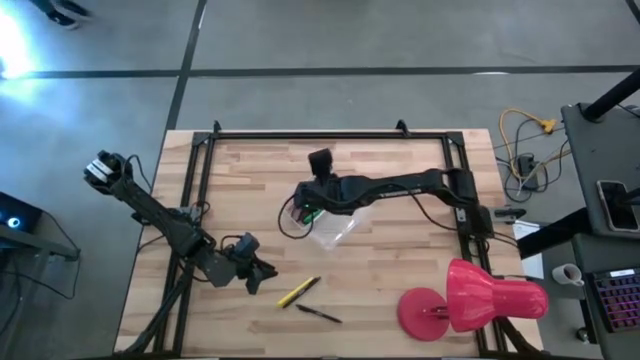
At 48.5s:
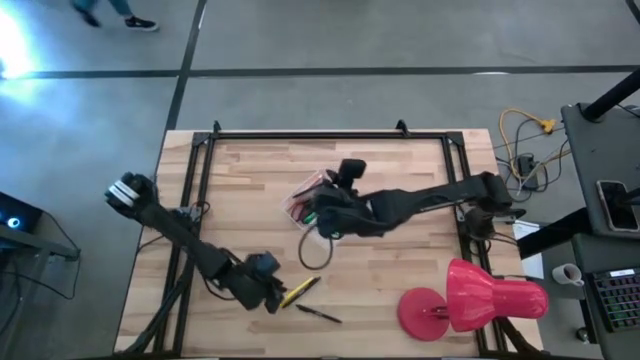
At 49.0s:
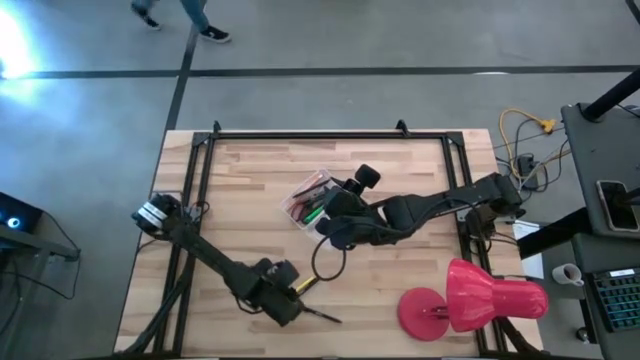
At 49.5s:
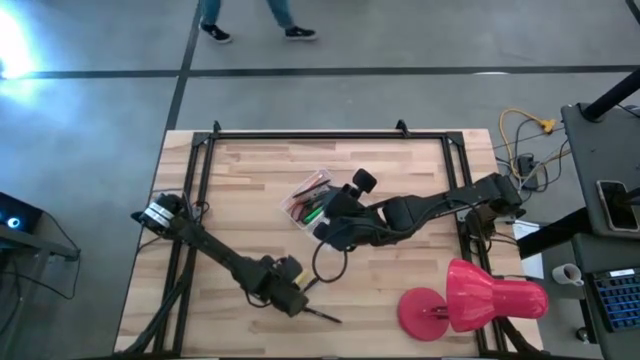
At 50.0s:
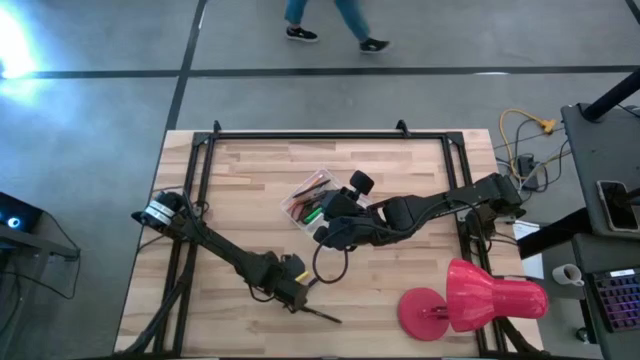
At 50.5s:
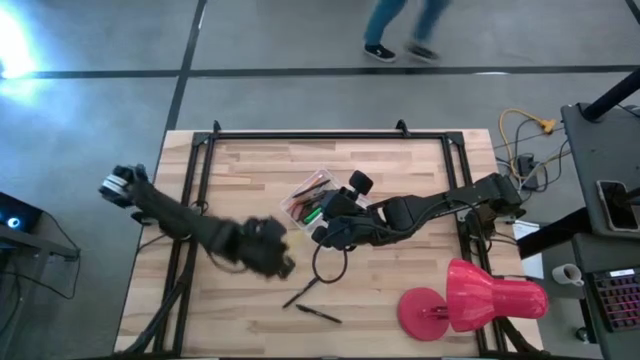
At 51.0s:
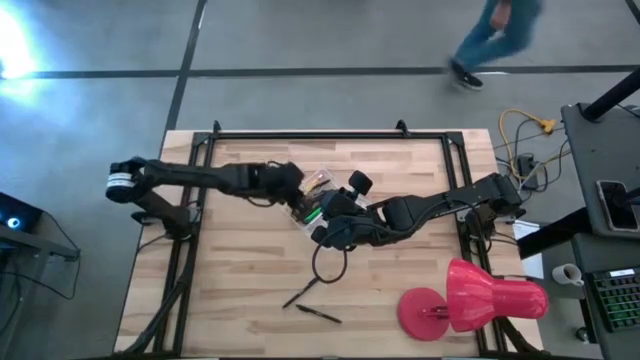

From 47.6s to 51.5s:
Task: Pick & place school supplies into a supply box
Put the yellow pen into the transparent supply box

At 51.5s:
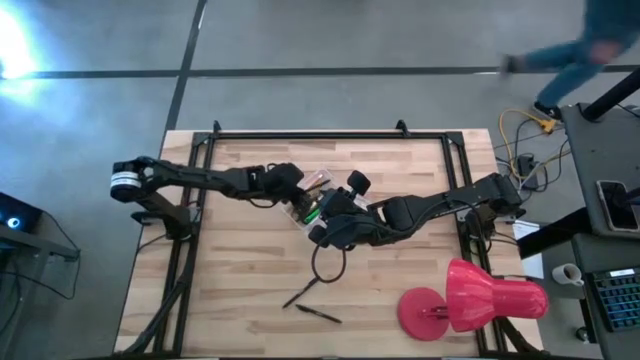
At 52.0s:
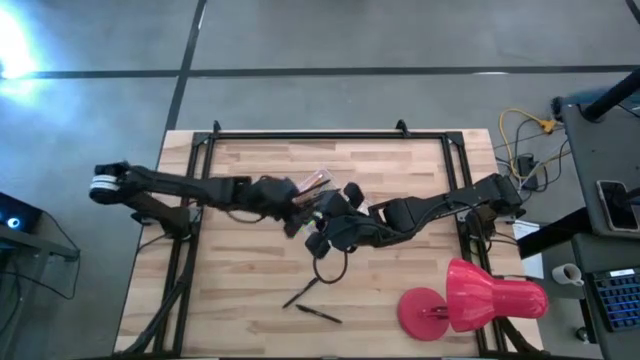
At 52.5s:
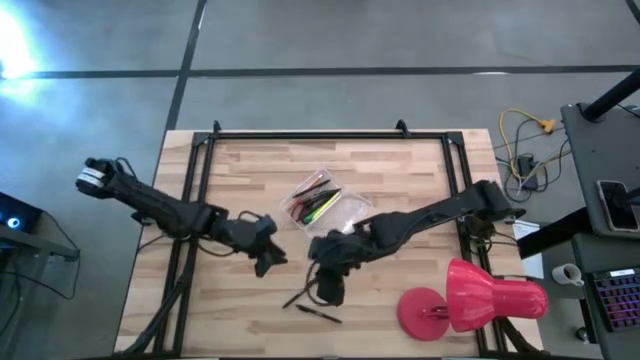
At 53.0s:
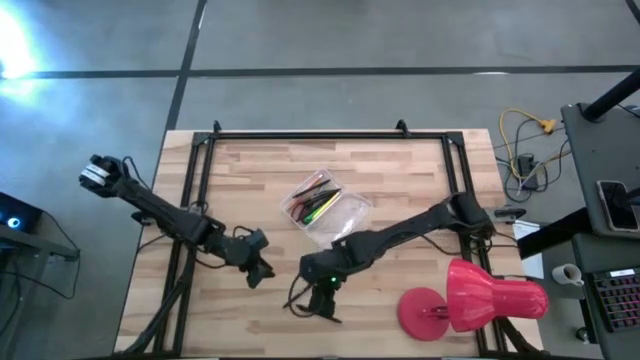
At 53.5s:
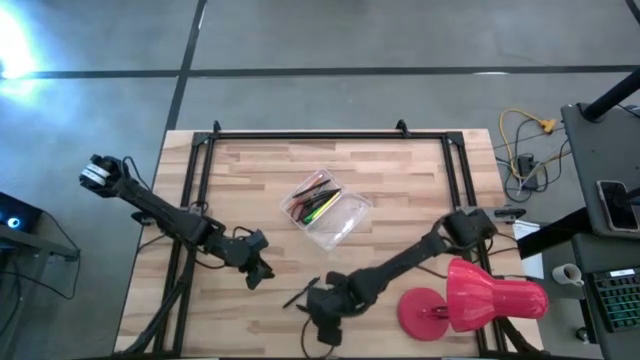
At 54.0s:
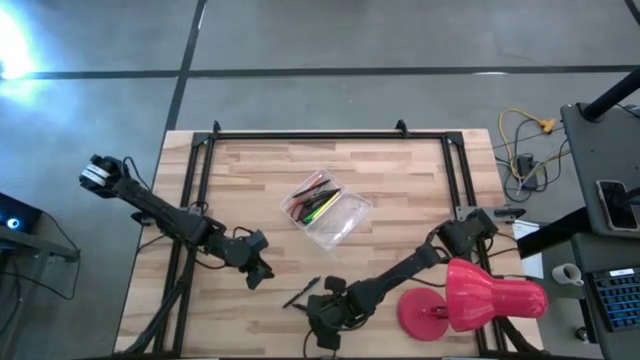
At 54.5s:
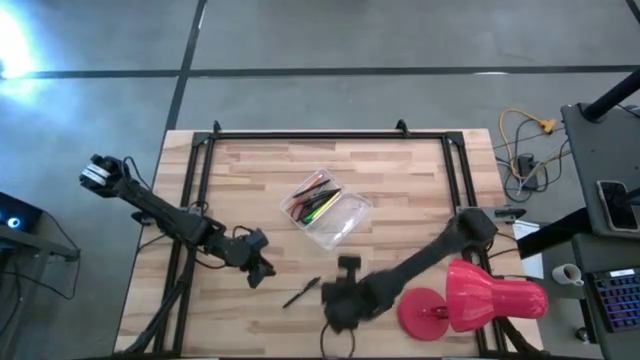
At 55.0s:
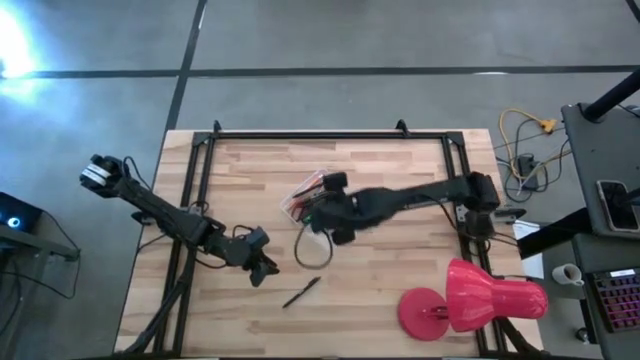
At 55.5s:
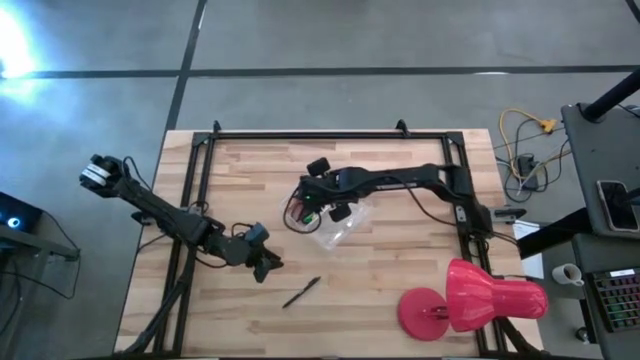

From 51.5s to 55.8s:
Put the black pen into the transparent supply box

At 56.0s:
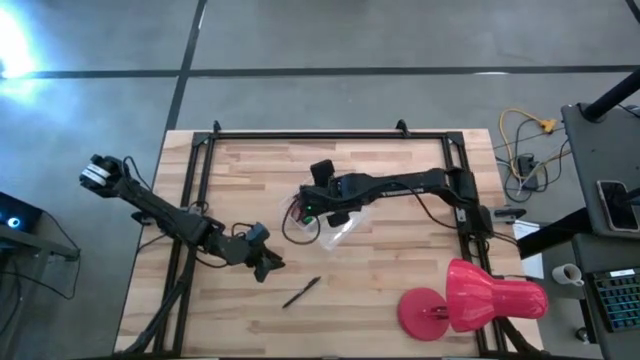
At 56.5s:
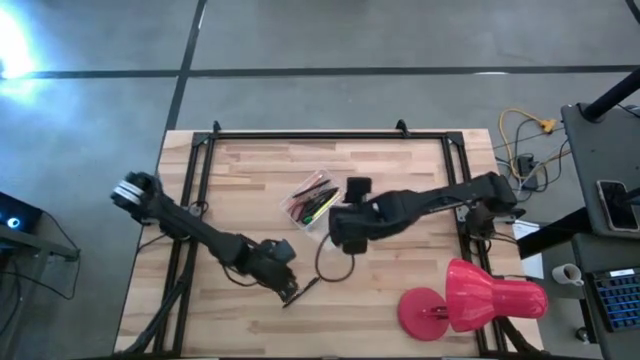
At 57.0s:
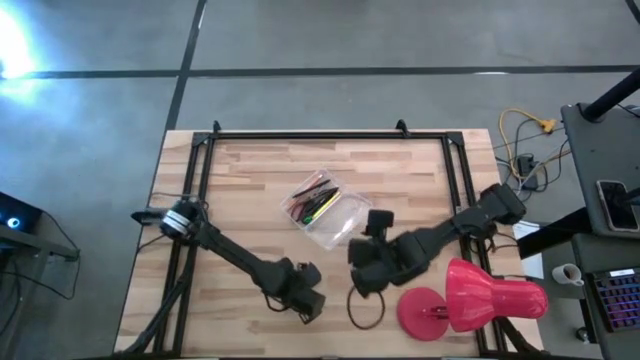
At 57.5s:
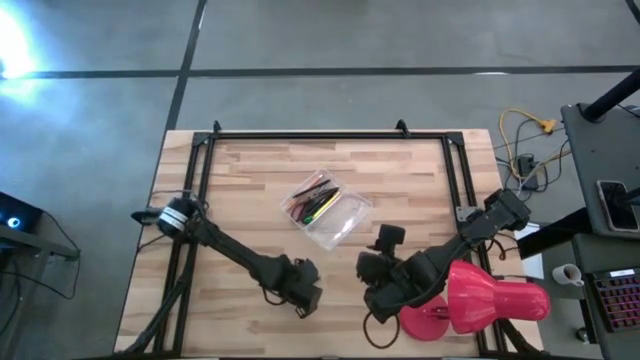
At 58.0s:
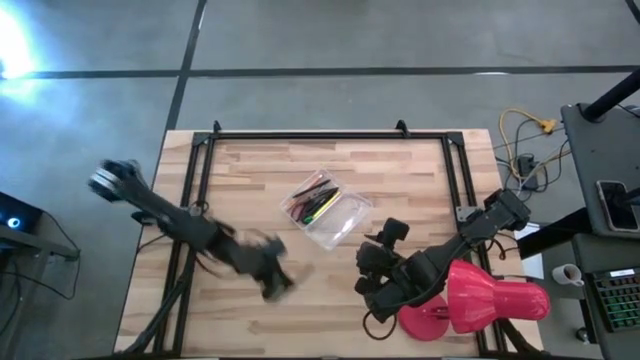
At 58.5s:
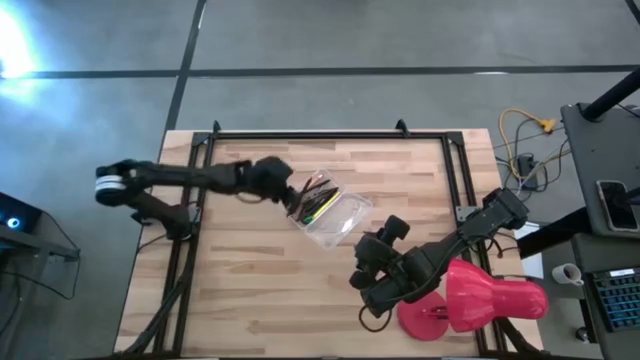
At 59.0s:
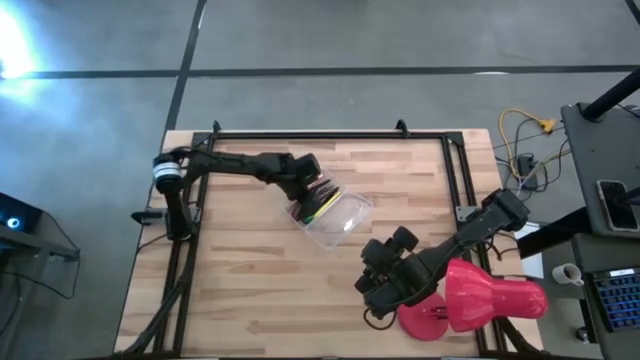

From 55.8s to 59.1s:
Put the black pen into the transparent supply box

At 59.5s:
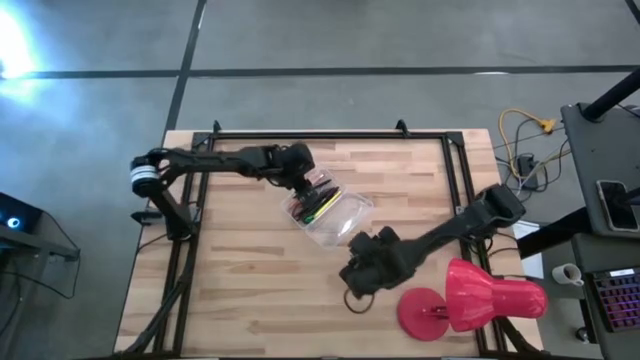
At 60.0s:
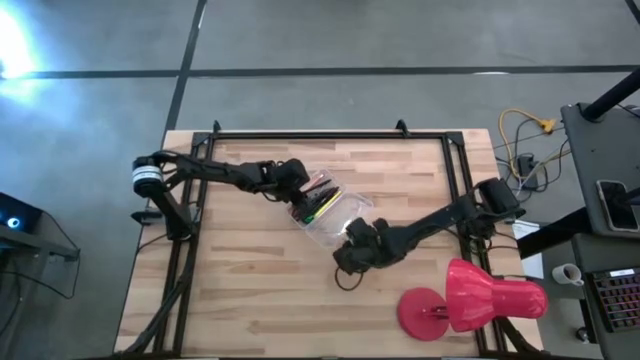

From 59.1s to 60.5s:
Close the transparent supply box

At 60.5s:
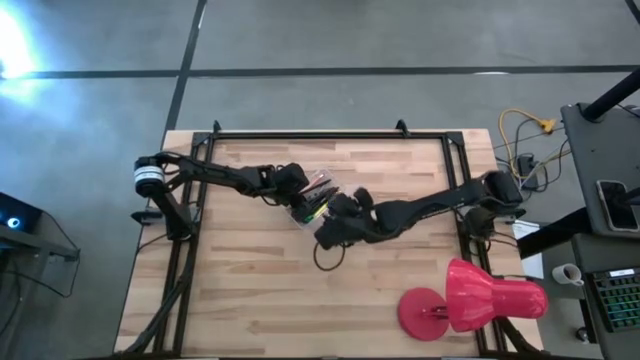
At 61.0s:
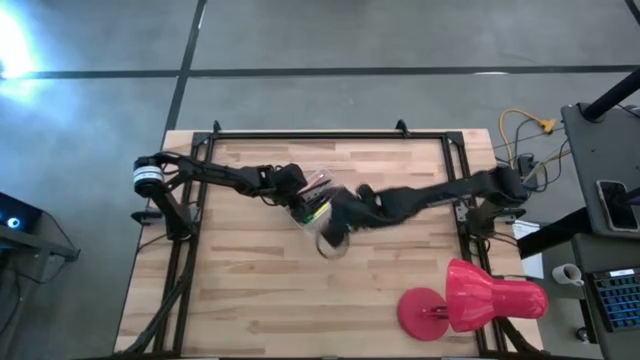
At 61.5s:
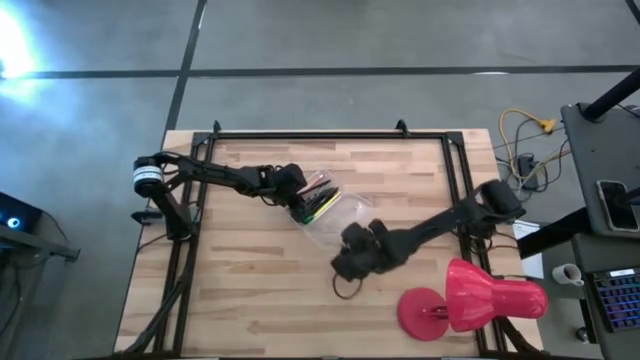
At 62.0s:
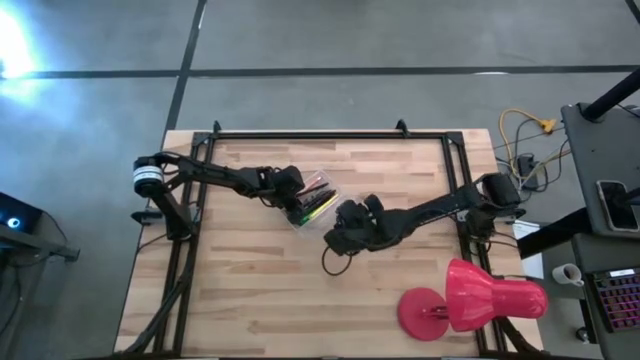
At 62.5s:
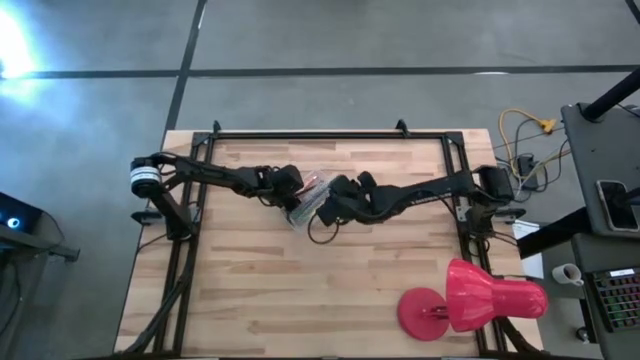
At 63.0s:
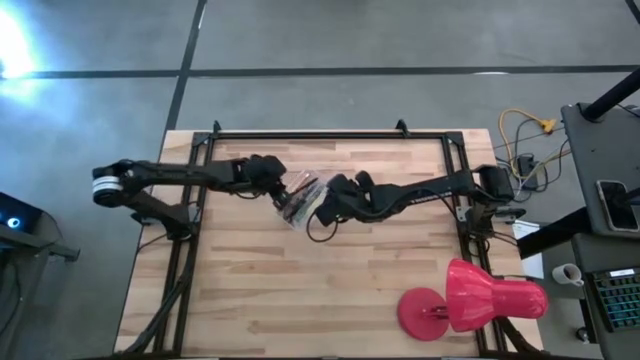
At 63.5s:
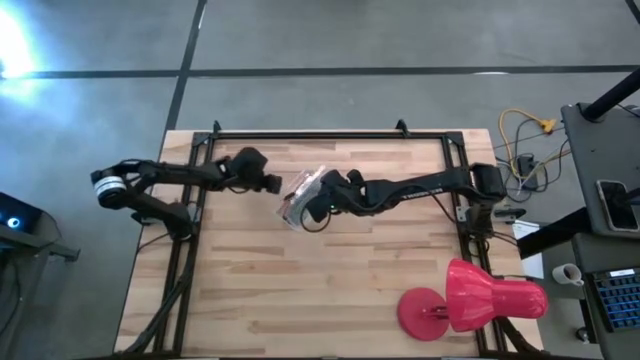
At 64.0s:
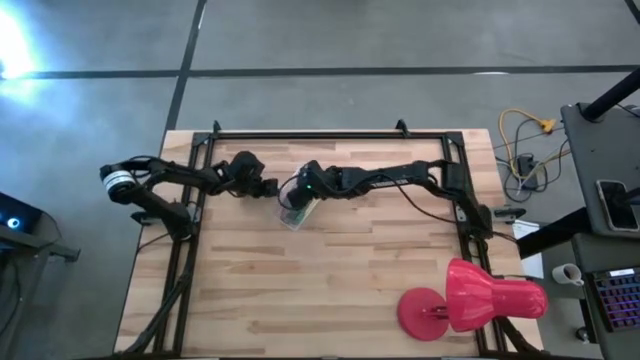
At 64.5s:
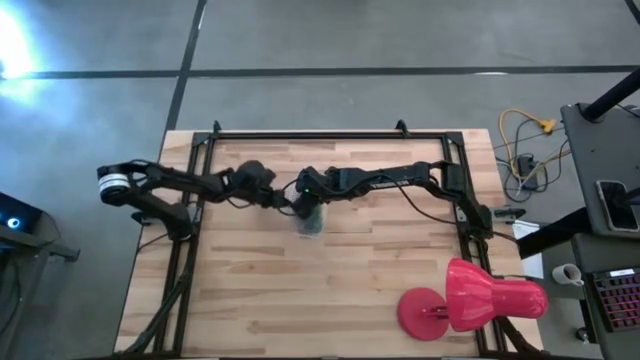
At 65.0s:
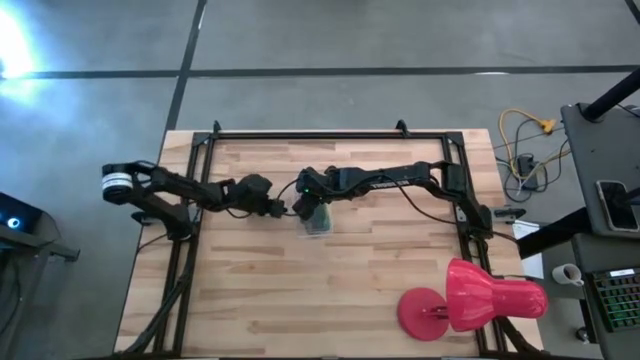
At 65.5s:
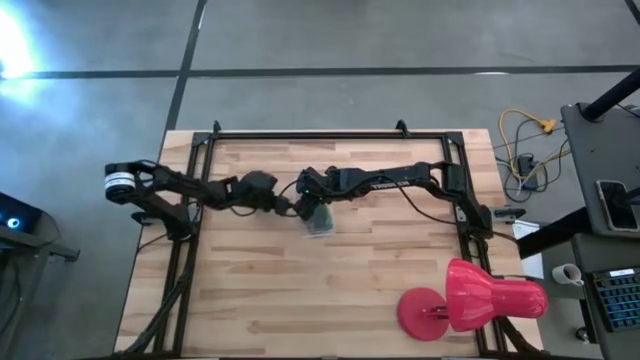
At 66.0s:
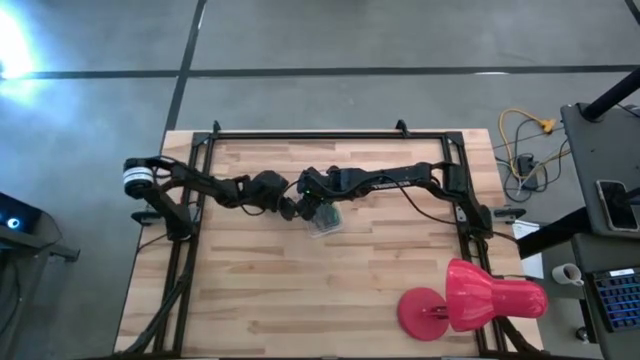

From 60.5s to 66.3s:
Close the transparent supply box

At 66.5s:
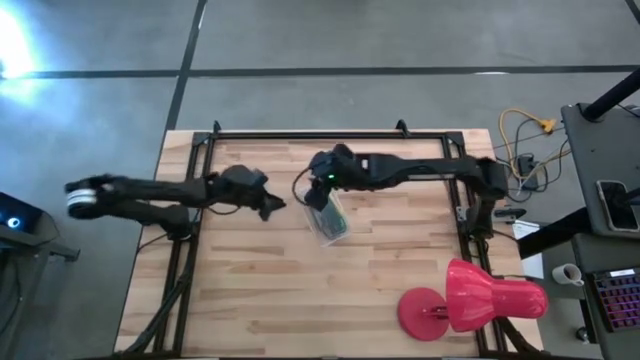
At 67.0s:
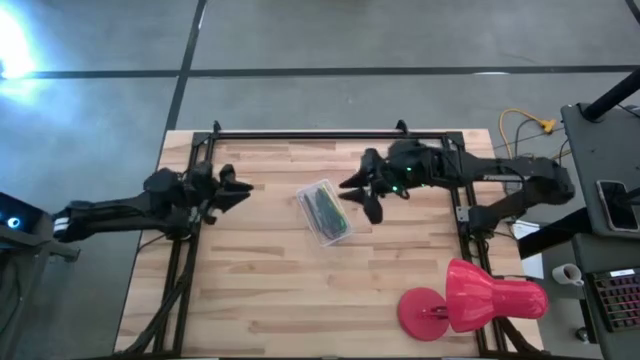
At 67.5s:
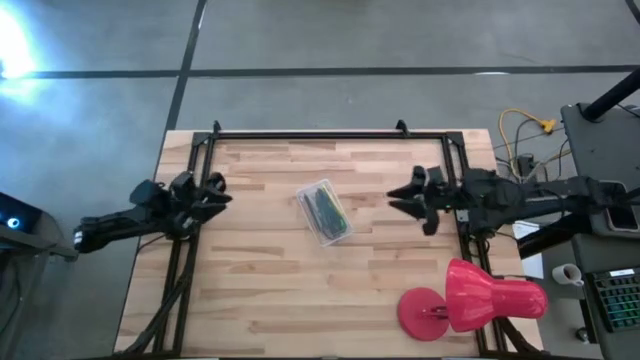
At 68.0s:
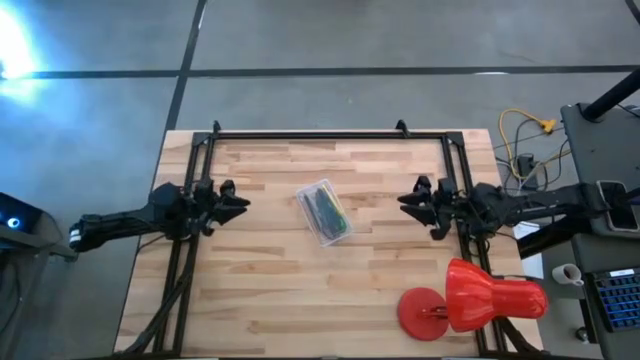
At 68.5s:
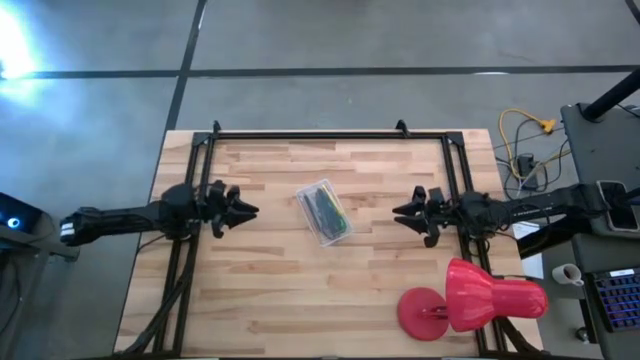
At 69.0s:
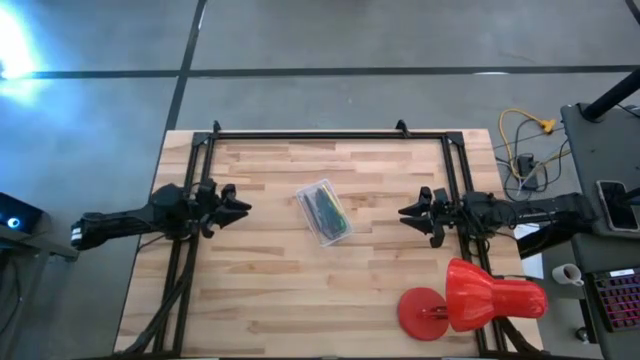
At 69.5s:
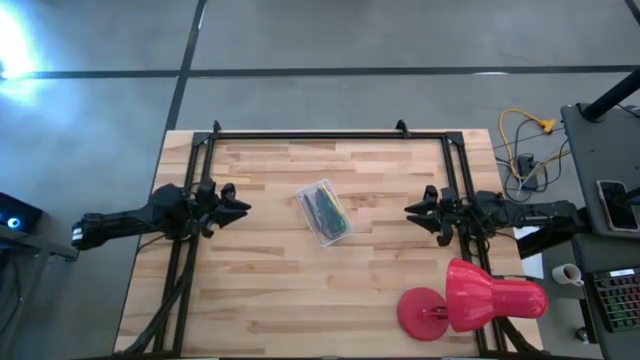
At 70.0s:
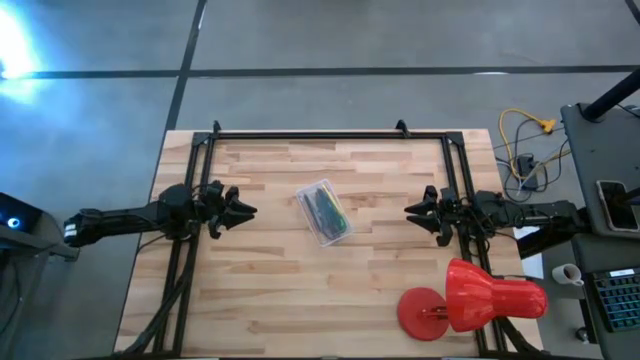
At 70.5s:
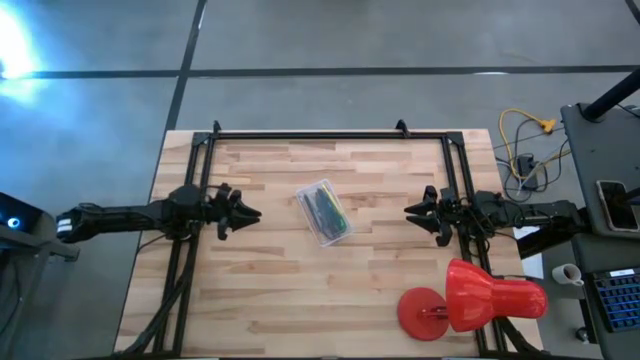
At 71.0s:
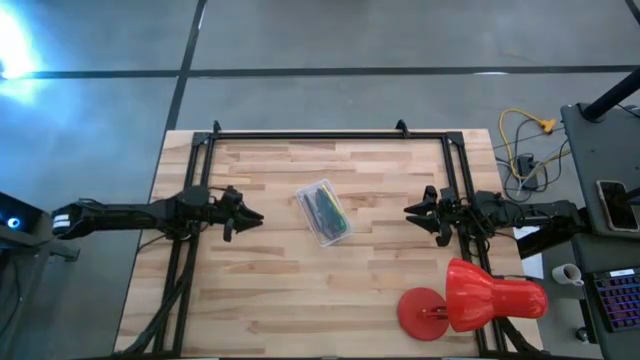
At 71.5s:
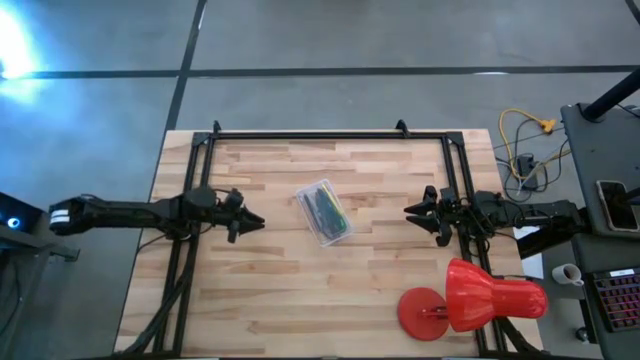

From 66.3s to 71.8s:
Return to Home Position
